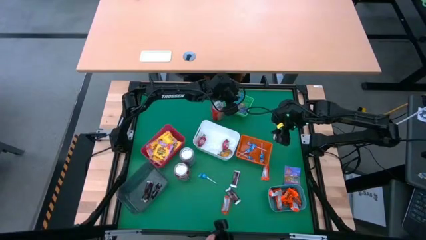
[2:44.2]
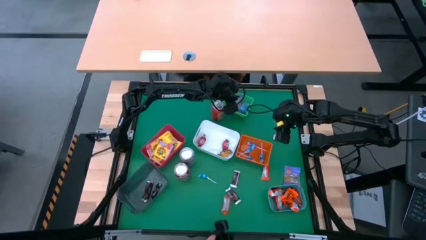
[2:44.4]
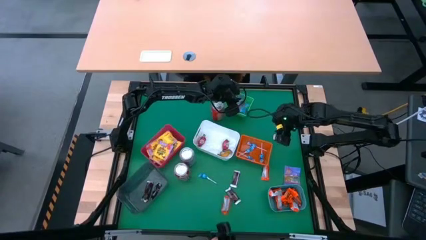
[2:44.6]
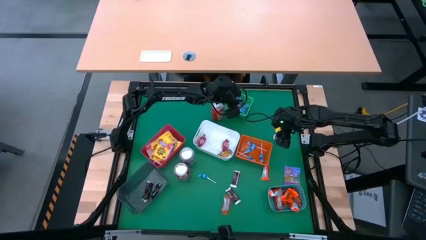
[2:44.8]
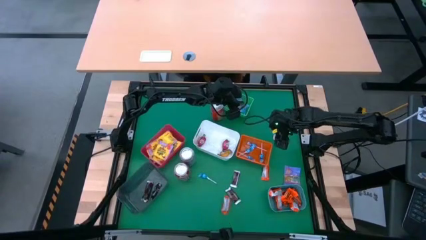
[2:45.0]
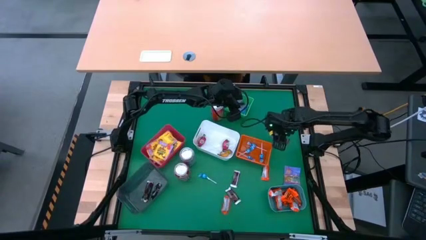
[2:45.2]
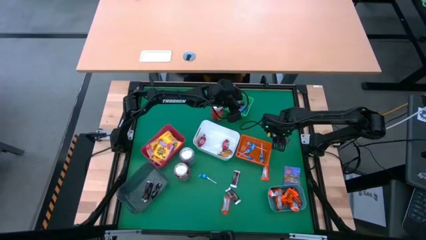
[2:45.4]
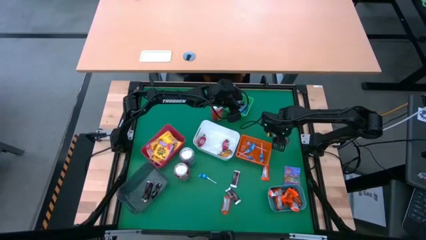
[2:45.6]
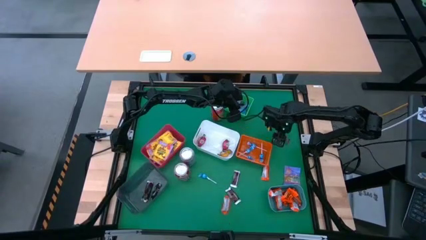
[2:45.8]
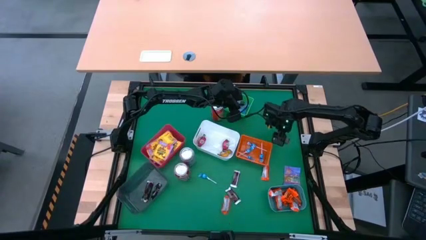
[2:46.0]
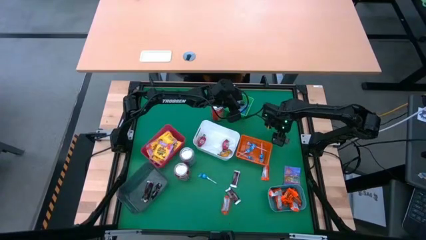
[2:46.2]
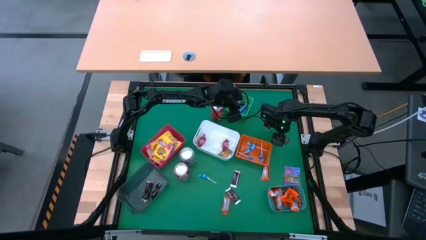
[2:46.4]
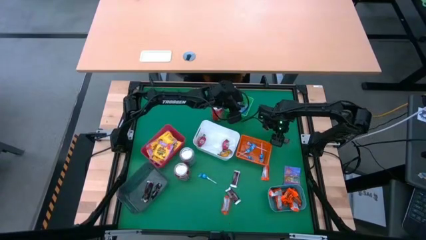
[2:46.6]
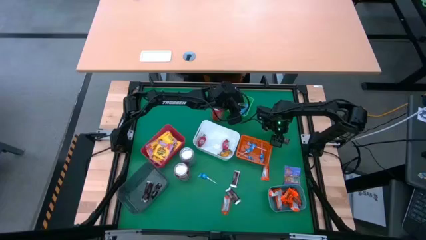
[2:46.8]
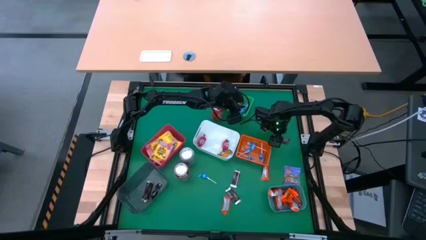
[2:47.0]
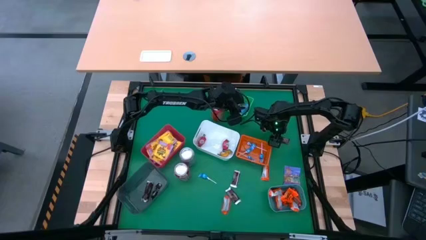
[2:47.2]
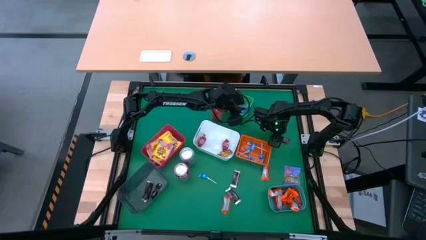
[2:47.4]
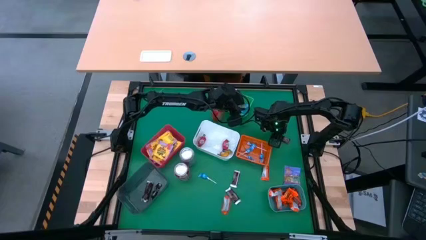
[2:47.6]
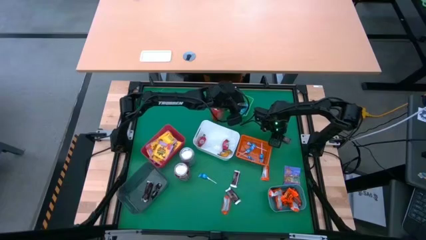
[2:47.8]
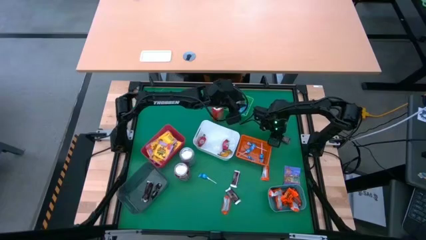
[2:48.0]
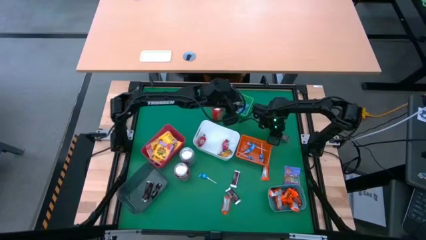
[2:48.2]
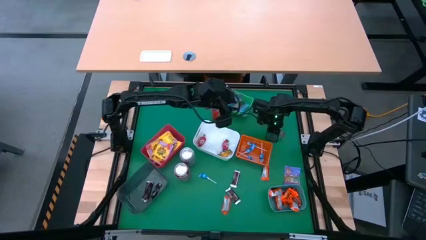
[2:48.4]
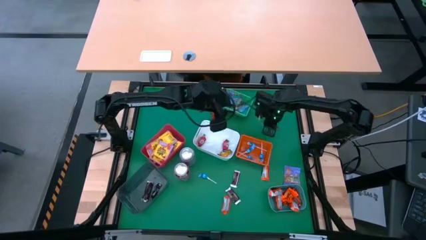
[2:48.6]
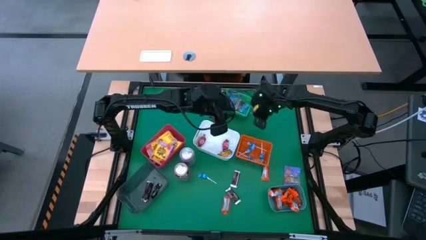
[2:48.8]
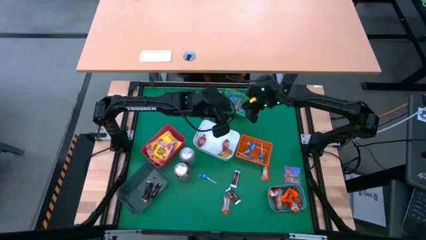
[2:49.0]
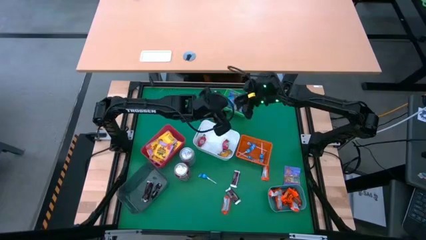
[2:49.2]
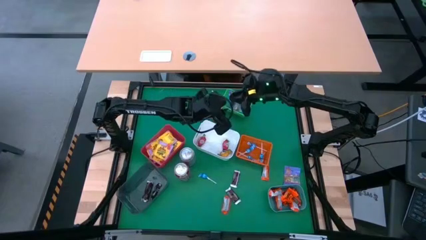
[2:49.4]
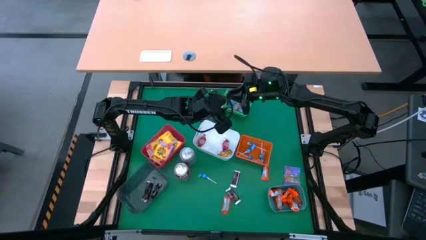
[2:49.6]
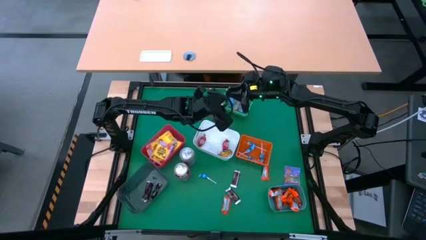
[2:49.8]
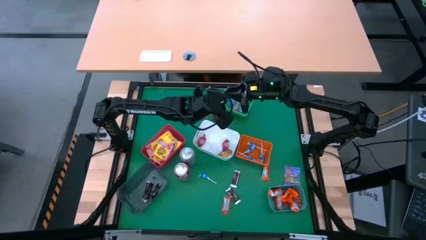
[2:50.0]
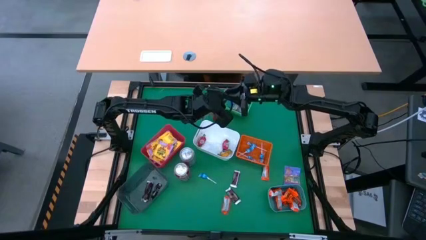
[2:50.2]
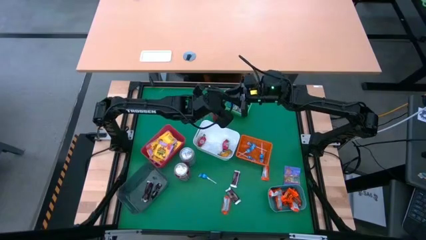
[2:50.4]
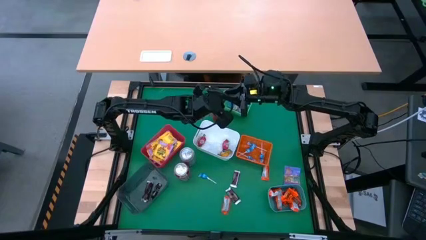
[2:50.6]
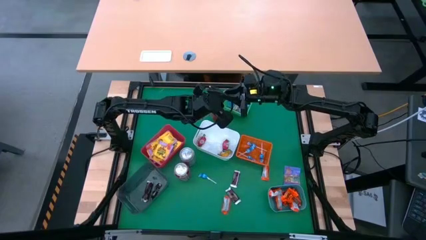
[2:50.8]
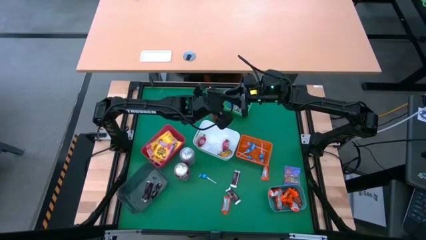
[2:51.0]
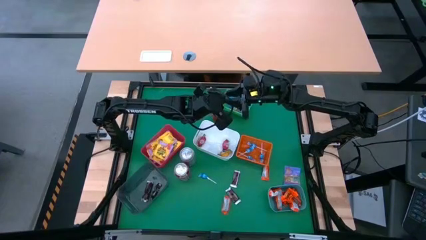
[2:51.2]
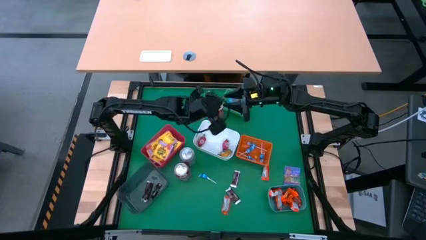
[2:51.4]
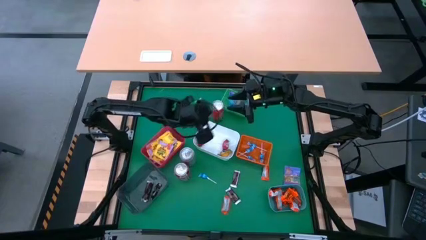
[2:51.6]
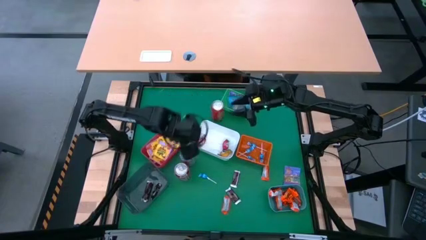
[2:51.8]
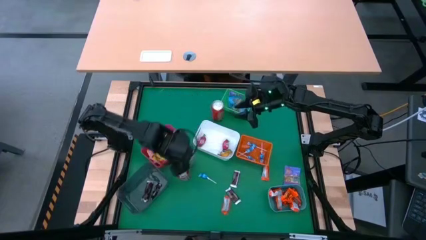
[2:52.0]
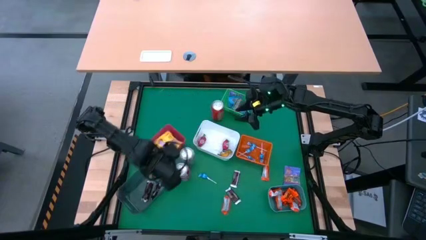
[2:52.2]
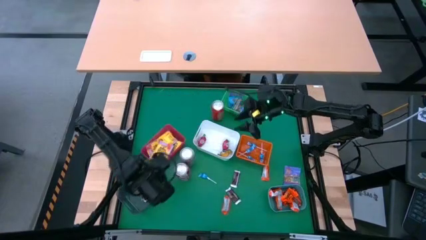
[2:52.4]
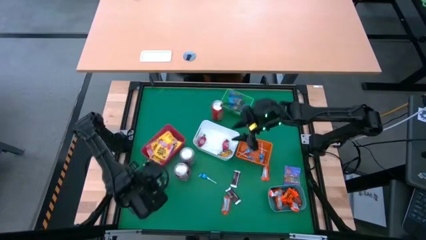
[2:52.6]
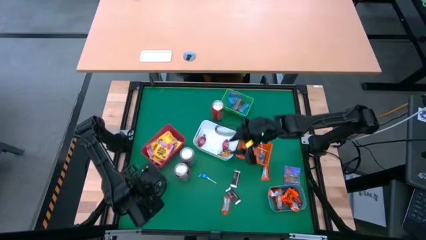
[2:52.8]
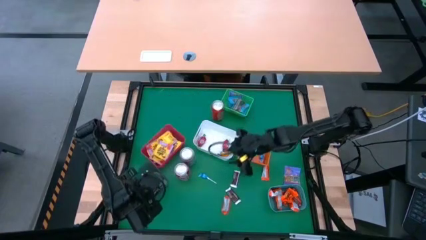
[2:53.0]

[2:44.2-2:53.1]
Task: Sort candy
Put the brown chocolate bar into the black bin

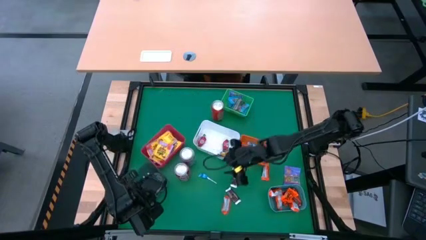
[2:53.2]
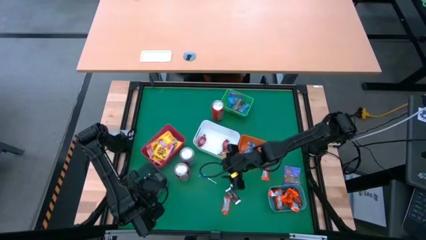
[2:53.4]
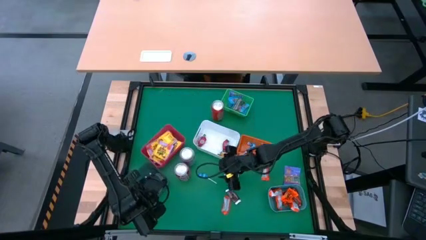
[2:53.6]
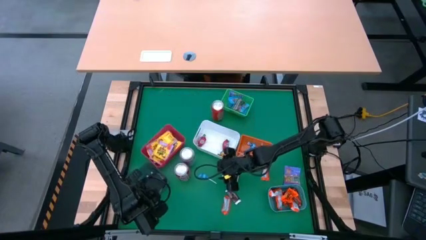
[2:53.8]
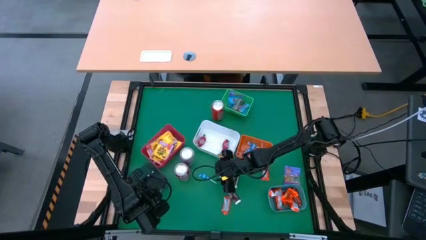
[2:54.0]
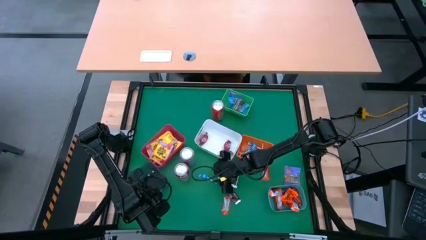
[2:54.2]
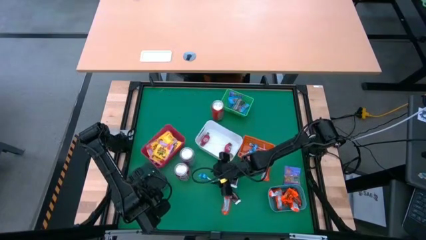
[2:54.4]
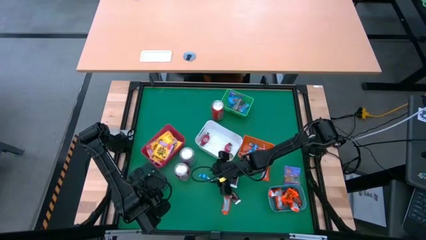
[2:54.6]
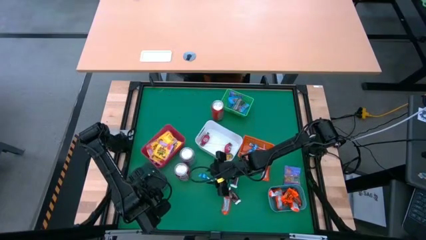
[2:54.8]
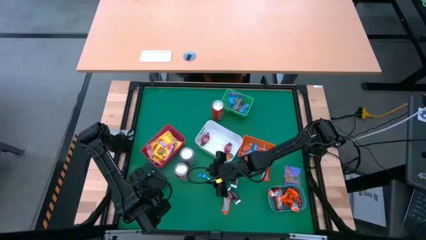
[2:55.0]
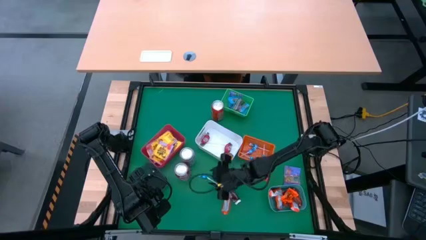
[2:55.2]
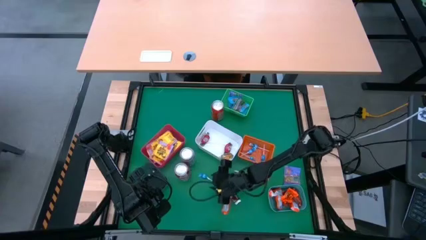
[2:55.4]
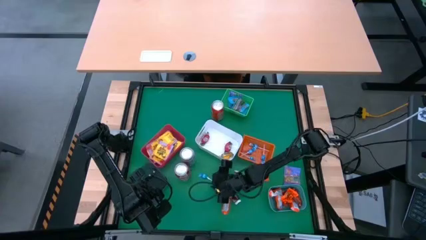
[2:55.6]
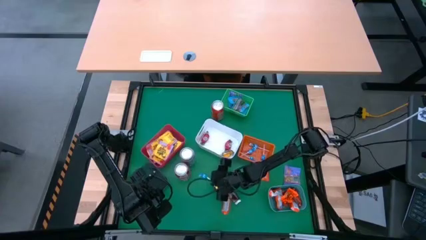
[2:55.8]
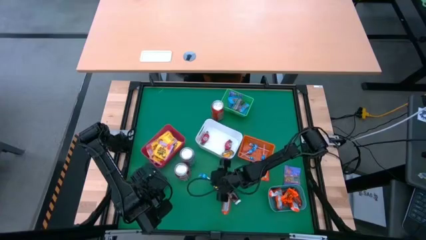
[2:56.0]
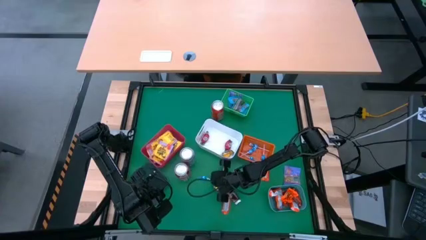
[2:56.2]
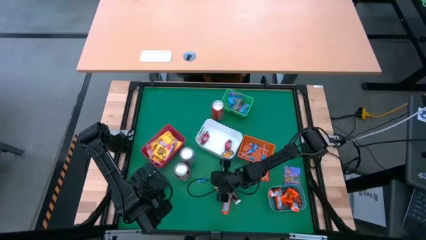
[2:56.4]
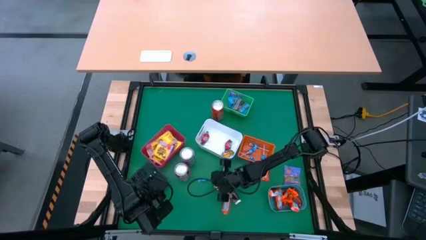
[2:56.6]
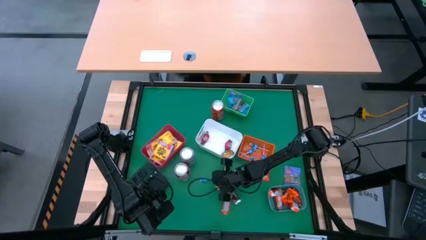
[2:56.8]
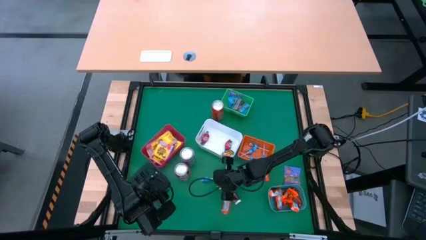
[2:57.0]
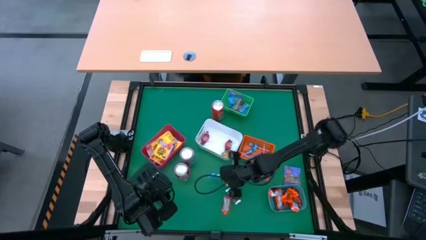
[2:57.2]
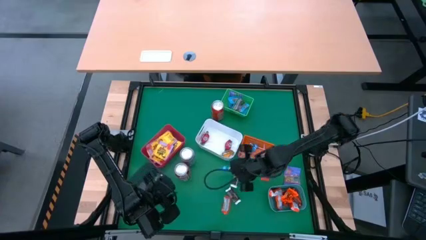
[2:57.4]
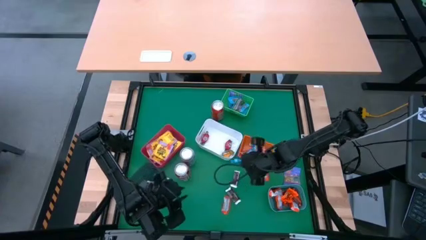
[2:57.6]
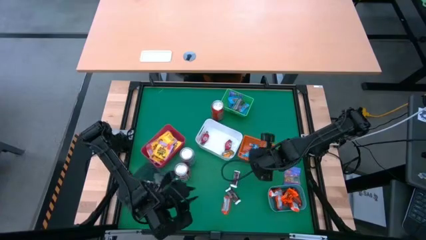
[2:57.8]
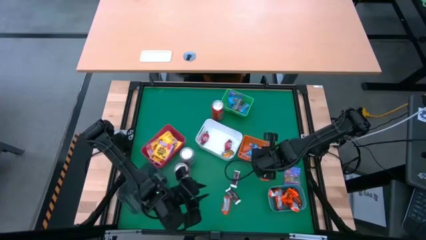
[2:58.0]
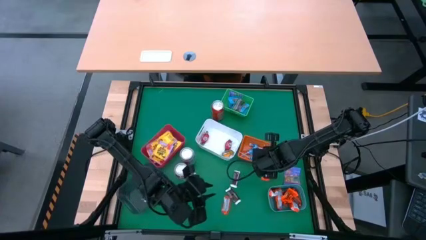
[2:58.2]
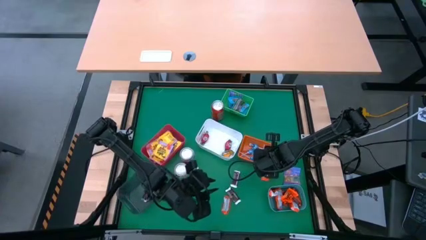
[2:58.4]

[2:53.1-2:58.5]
Put the blue lollipop into the orange bin

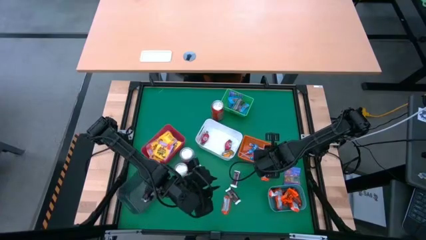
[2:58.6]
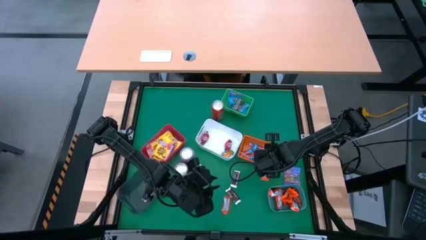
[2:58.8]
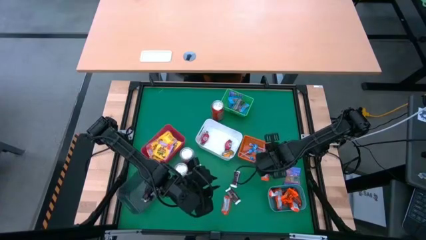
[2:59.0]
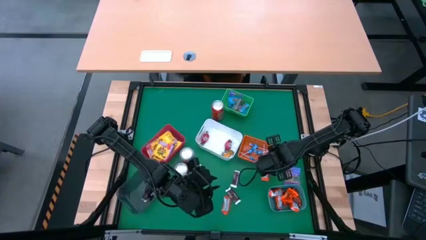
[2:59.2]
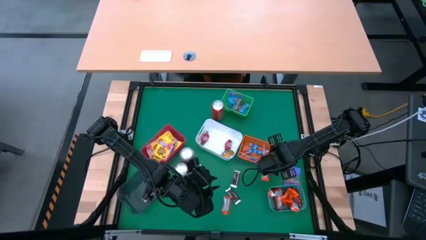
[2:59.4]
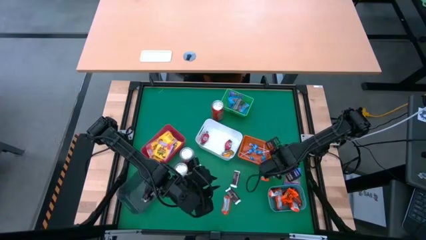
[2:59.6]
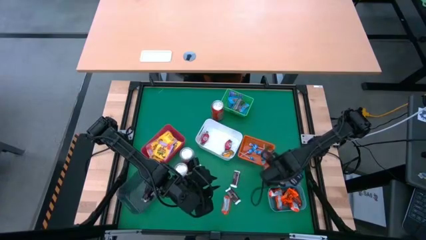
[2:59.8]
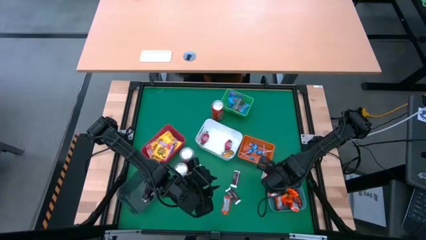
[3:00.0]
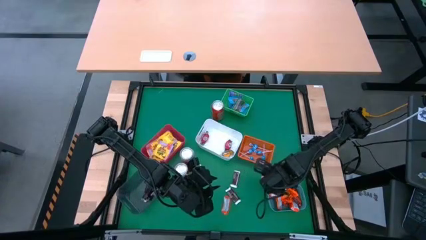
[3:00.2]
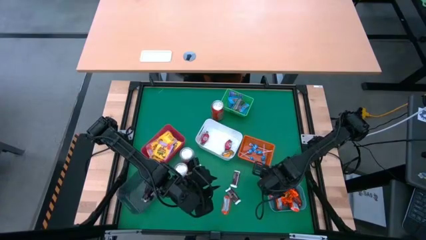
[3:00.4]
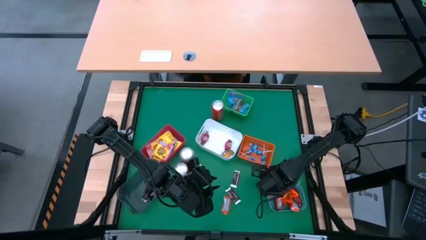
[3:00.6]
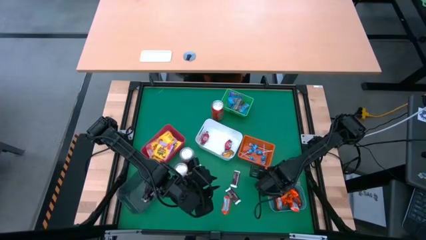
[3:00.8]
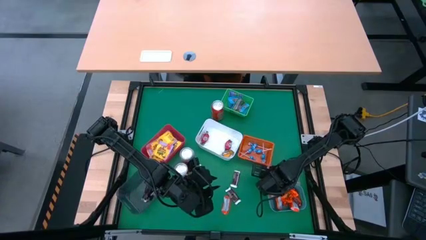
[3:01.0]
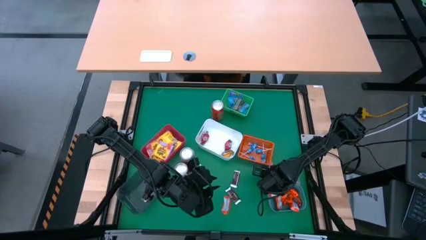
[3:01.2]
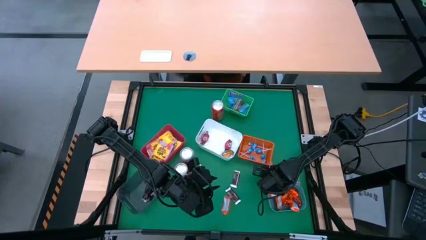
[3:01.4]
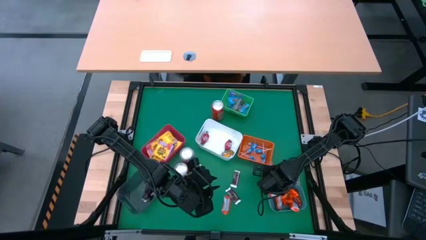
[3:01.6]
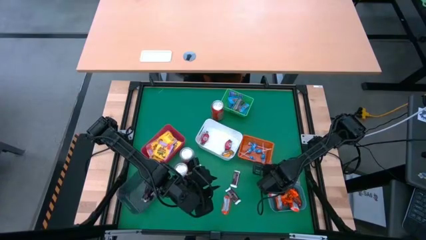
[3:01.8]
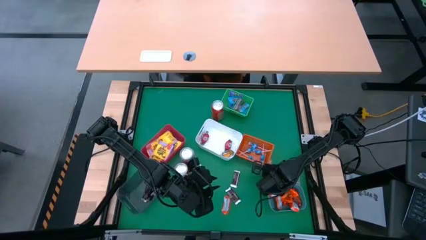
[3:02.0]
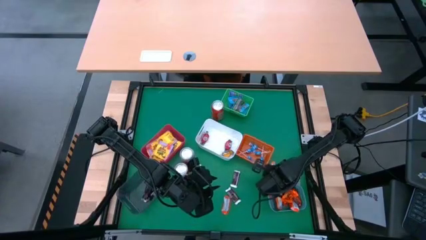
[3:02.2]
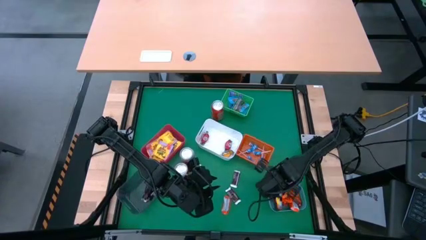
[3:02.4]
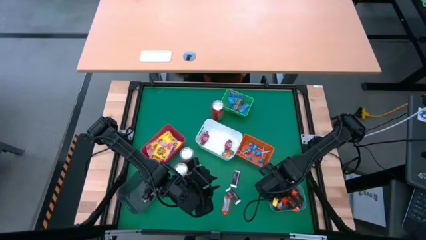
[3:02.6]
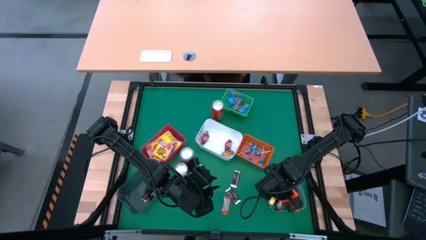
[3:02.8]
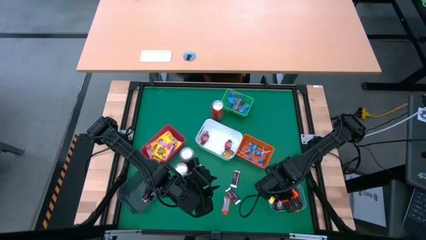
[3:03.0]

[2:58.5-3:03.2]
Put the orange chocolate into the blue bin
